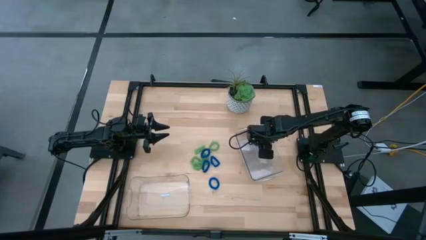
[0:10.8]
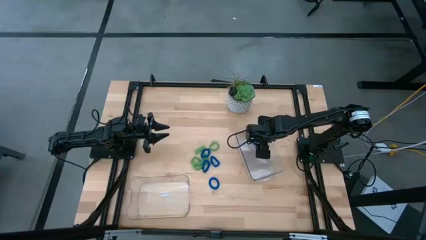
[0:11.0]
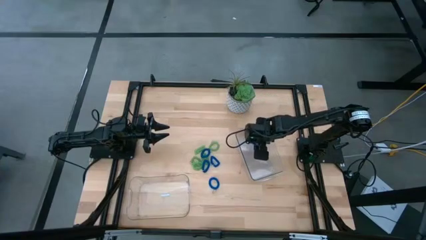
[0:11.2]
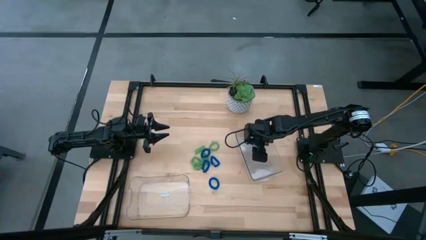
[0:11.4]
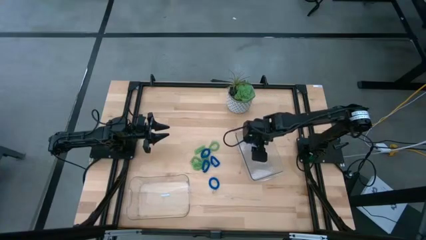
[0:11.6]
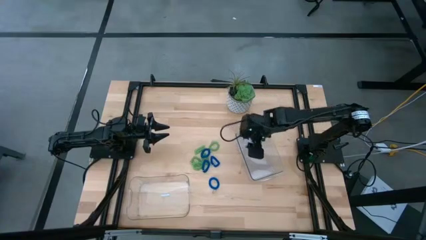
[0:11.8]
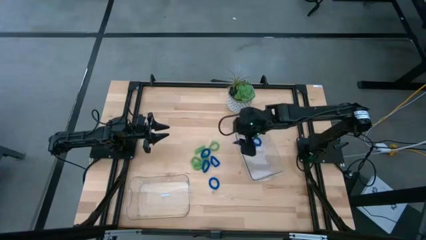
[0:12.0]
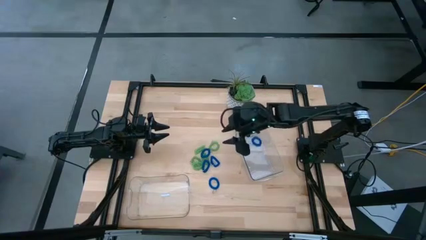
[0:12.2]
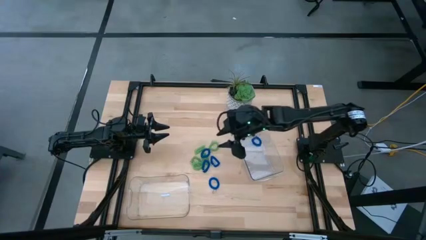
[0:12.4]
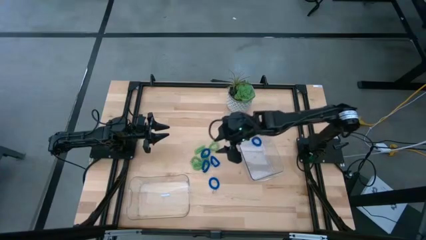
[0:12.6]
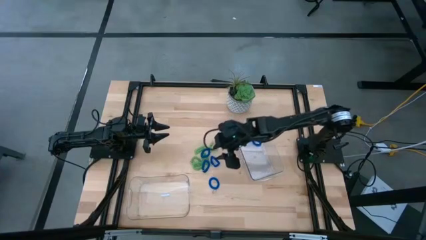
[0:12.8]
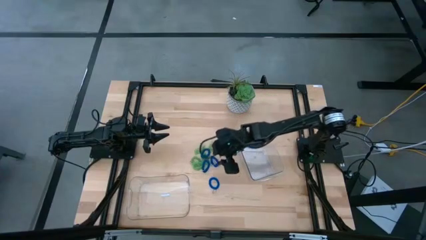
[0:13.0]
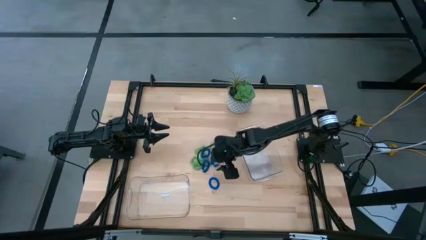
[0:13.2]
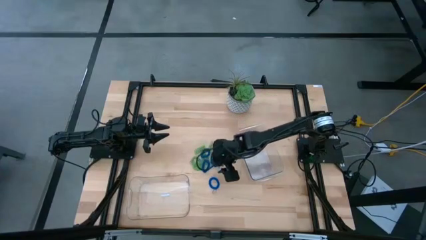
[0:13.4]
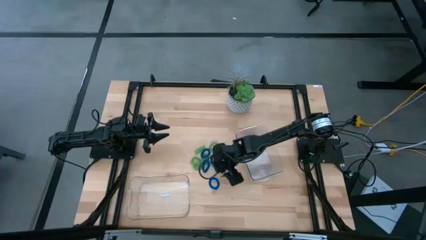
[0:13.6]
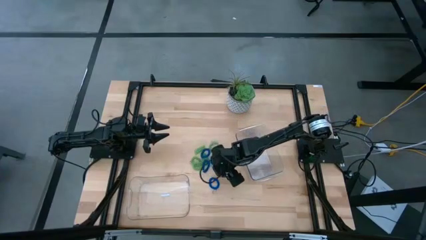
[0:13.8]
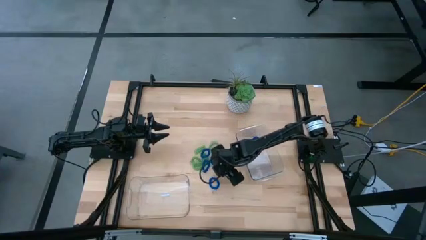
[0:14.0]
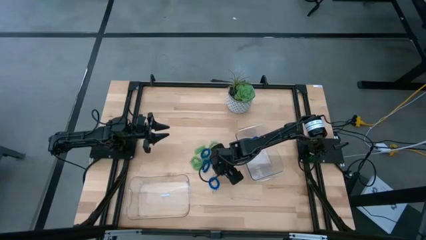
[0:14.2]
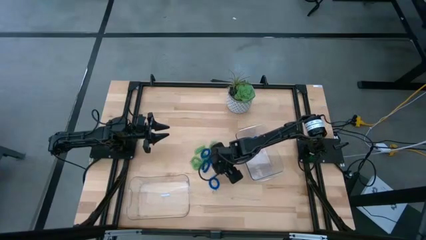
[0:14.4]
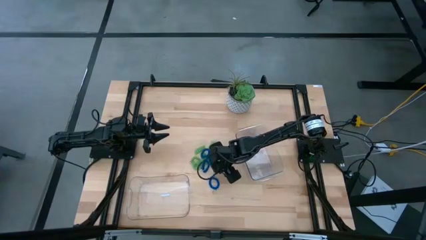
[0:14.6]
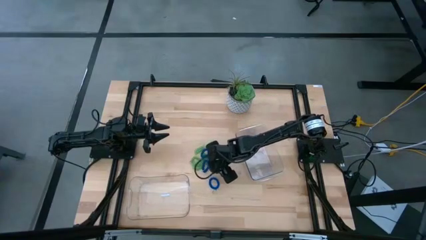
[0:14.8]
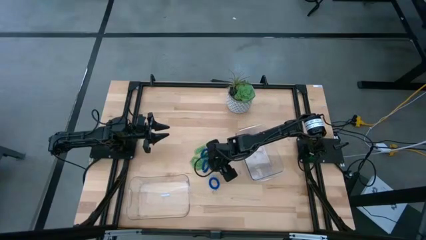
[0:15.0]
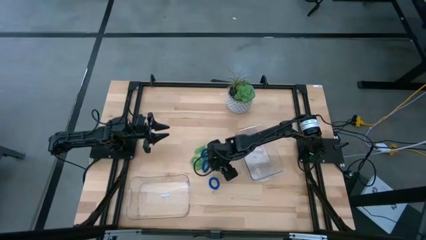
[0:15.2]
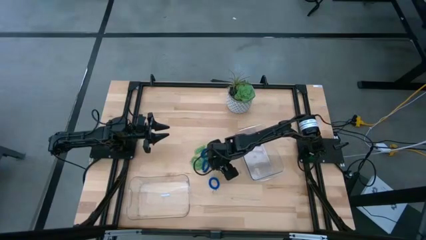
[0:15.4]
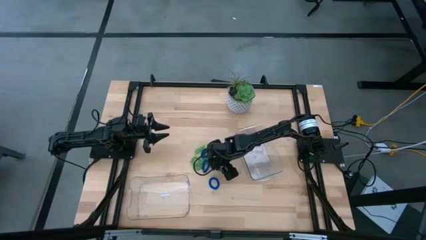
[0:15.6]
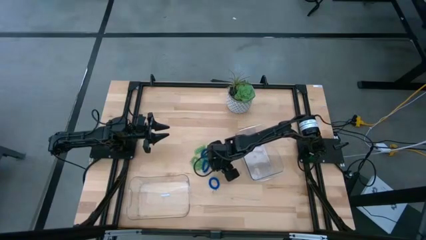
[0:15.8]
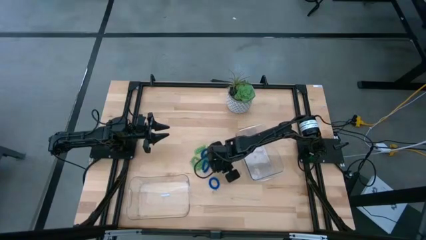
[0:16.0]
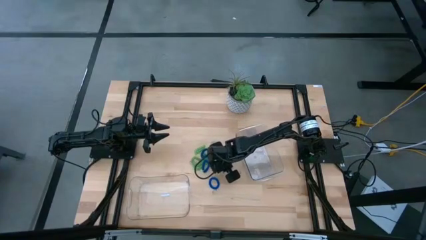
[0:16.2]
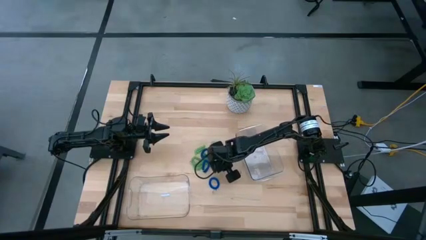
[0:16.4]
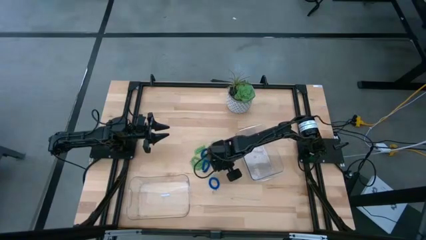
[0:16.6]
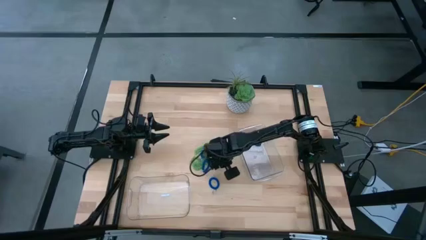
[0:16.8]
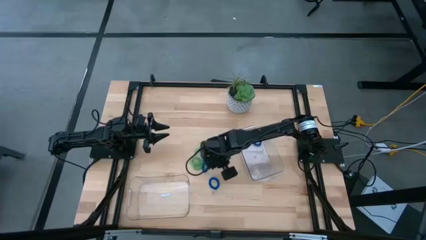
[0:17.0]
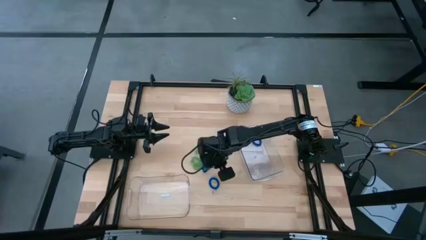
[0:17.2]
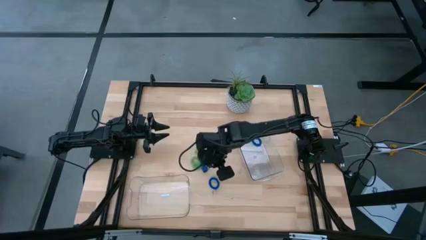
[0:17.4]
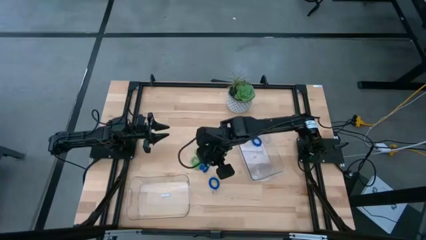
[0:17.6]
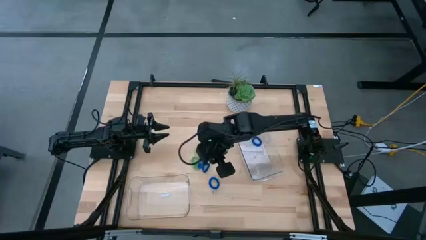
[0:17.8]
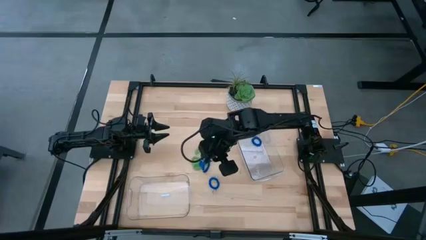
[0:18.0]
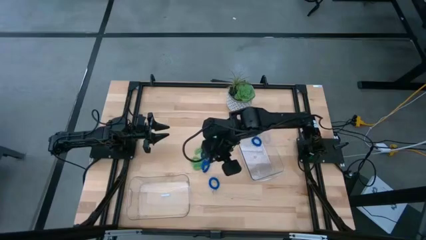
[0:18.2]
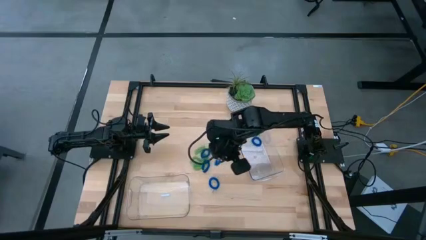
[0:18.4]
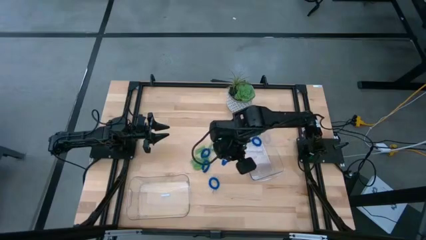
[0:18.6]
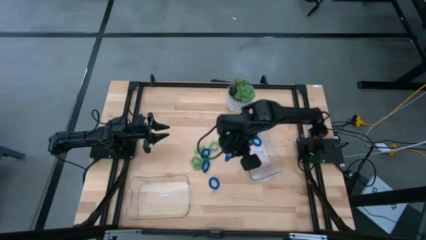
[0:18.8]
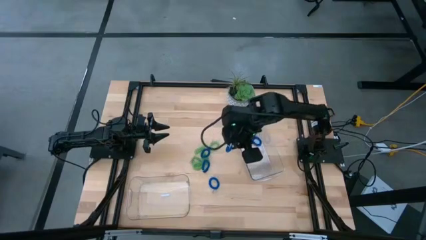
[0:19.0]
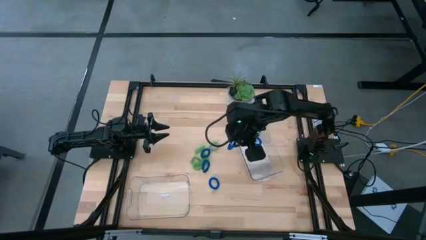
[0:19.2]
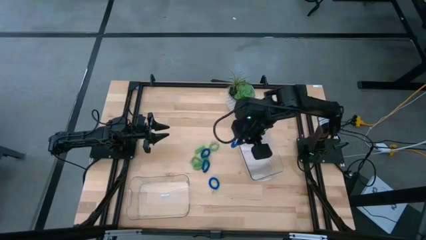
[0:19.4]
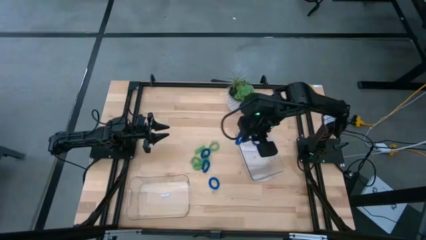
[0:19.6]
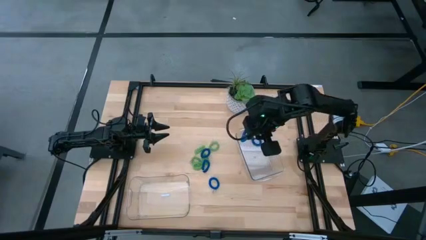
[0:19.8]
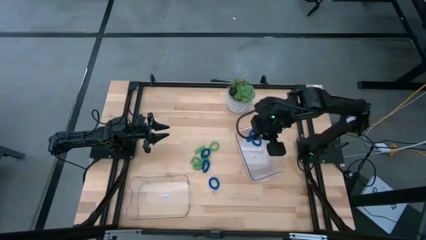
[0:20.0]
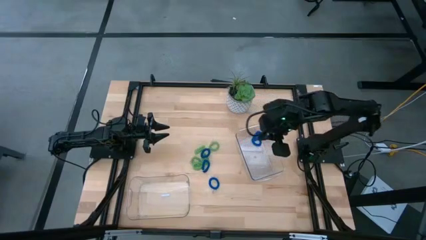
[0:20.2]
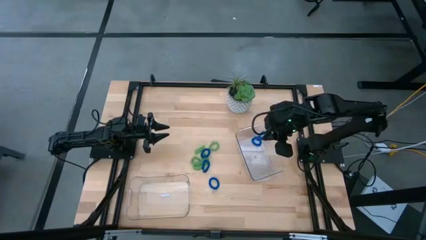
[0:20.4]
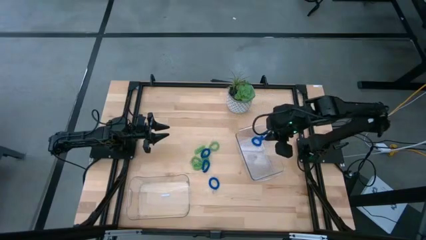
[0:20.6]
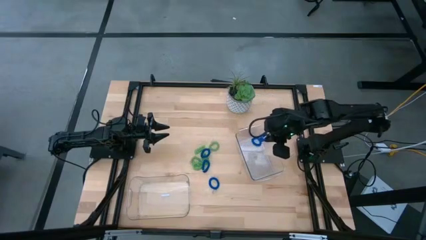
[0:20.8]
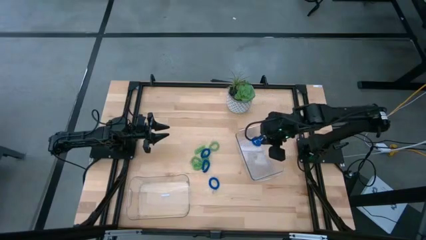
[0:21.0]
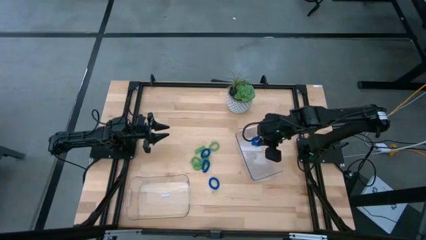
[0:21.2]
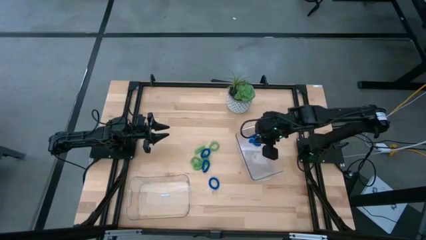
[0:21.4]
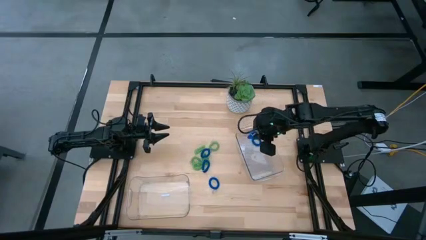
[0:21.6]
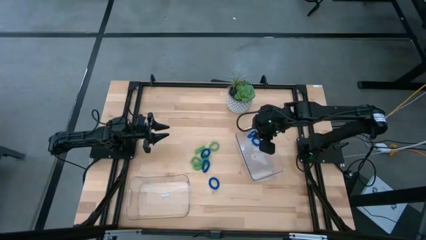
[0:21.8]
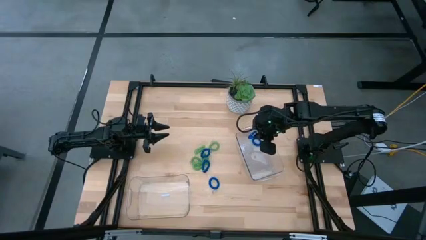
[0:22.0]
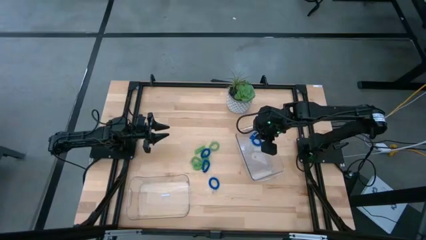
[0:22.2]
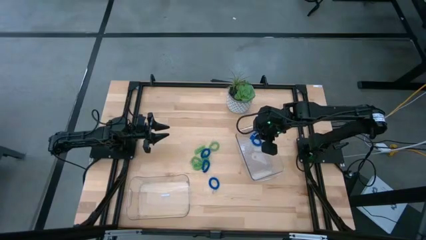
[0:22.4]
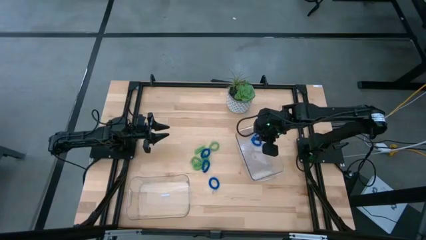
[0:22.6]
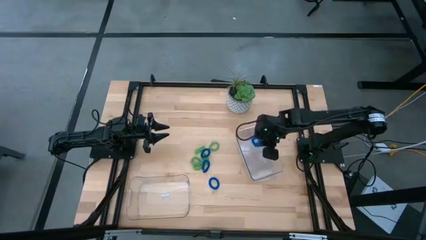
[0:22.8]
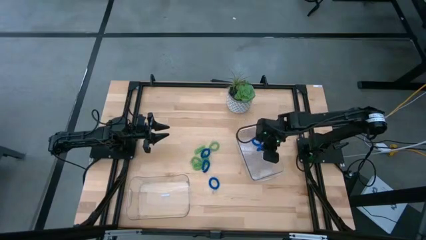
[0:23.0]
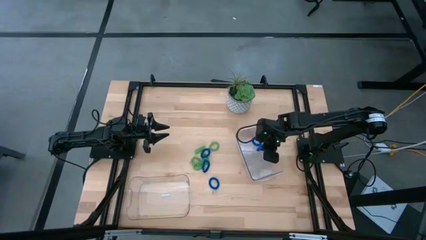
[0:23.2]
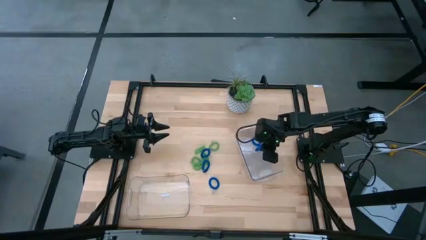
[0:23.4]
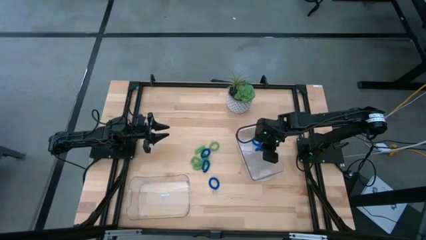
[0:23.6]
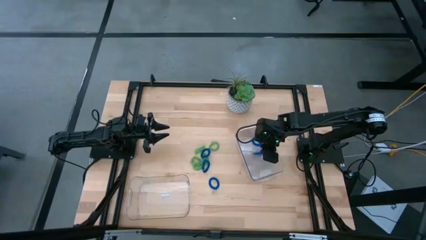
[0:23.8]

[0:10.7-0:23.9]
Task: Sort spring keychains
Put the blue spring keychain into the right transparent bin
